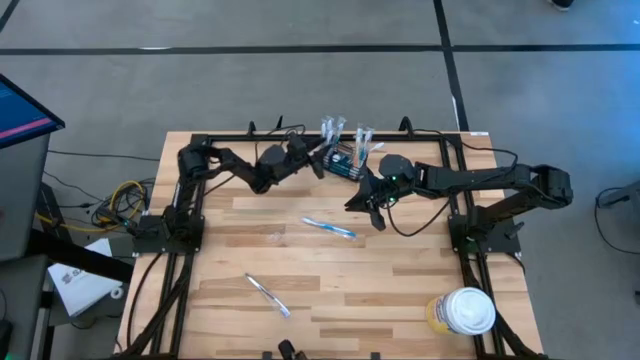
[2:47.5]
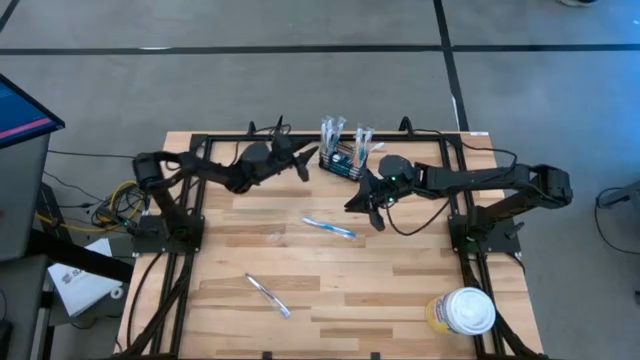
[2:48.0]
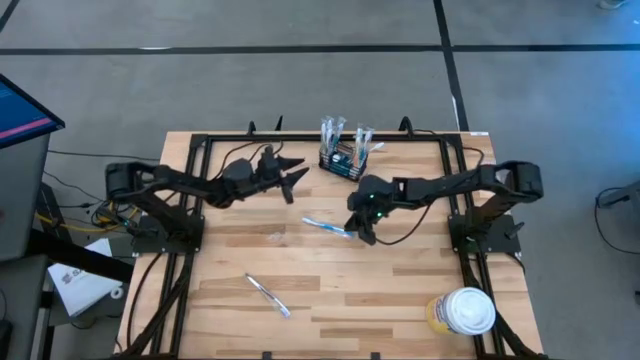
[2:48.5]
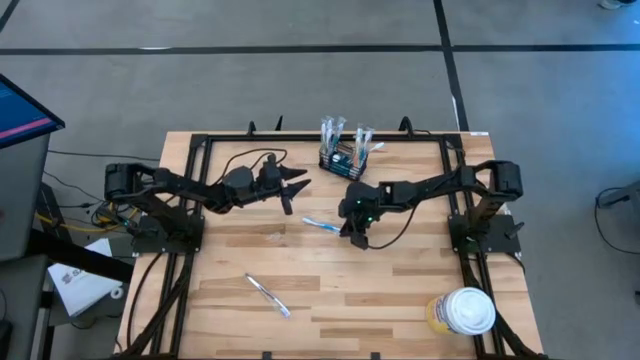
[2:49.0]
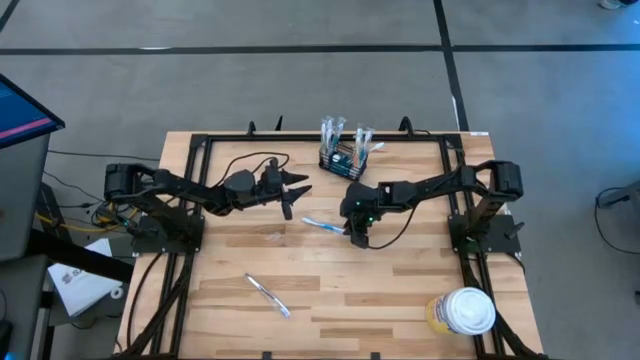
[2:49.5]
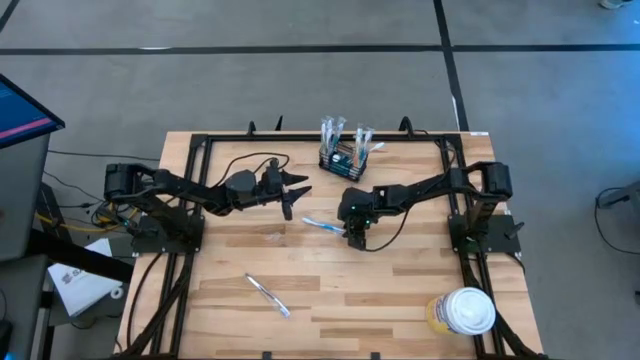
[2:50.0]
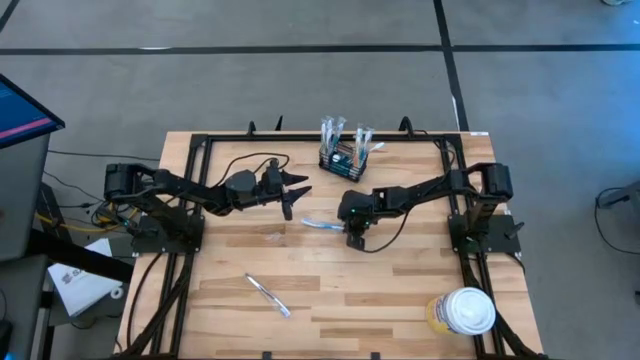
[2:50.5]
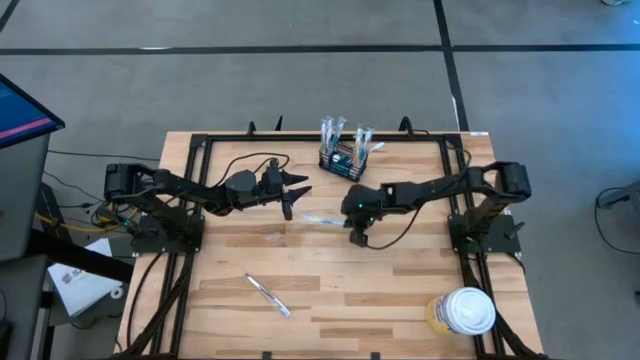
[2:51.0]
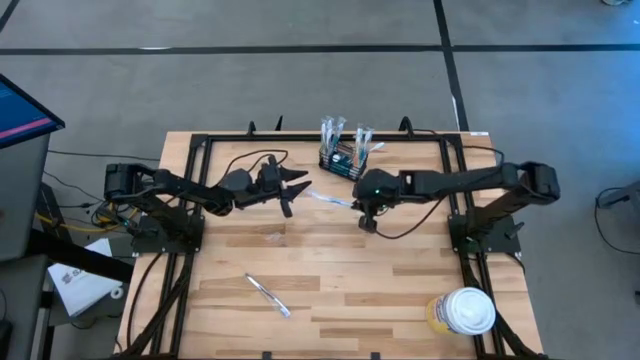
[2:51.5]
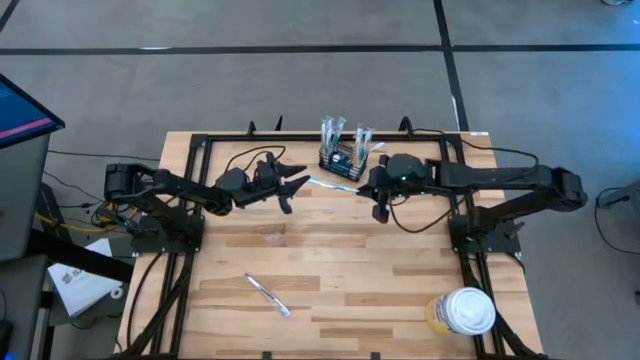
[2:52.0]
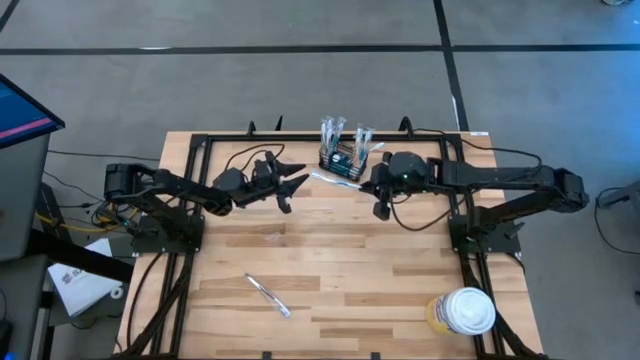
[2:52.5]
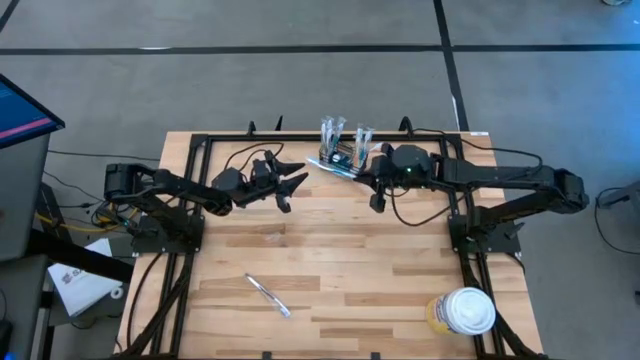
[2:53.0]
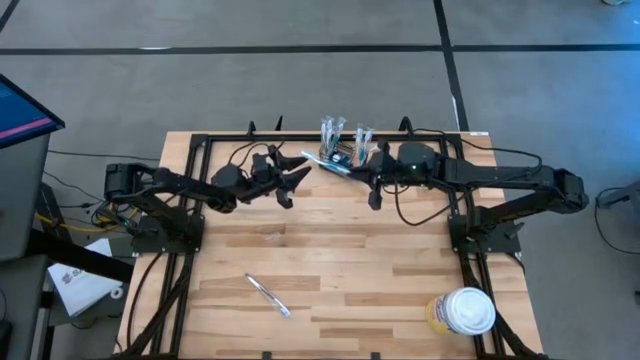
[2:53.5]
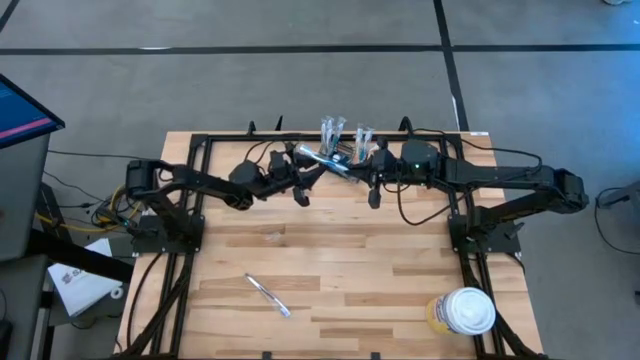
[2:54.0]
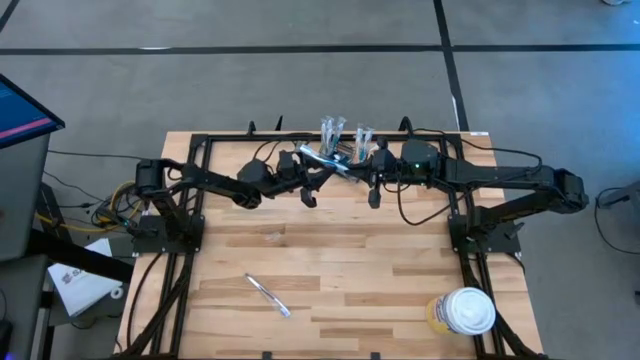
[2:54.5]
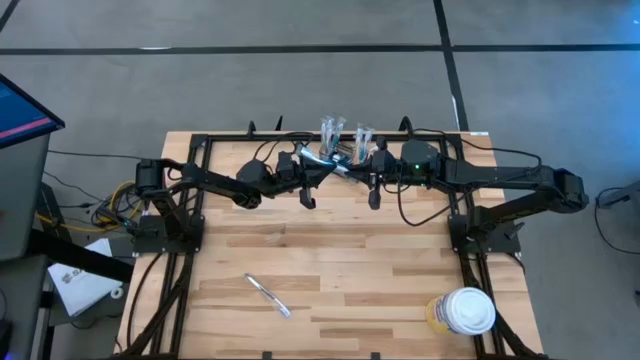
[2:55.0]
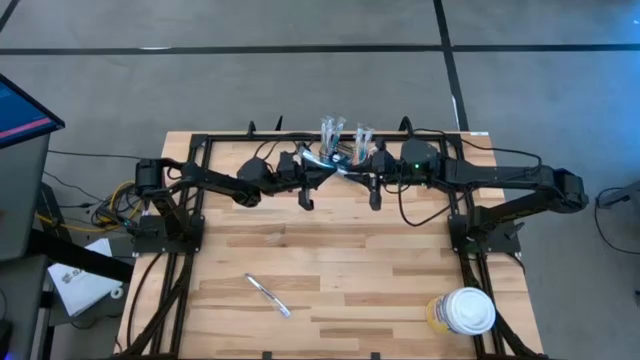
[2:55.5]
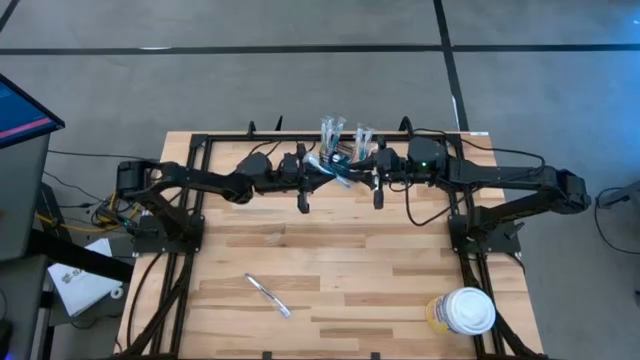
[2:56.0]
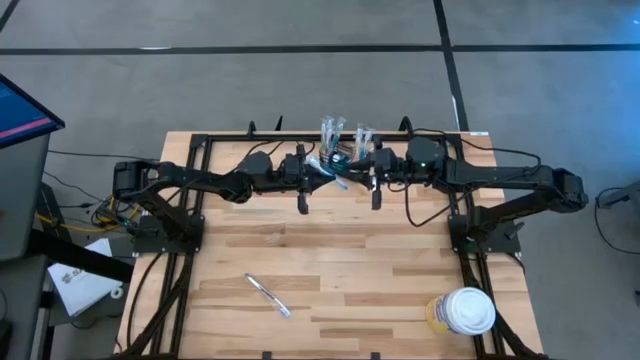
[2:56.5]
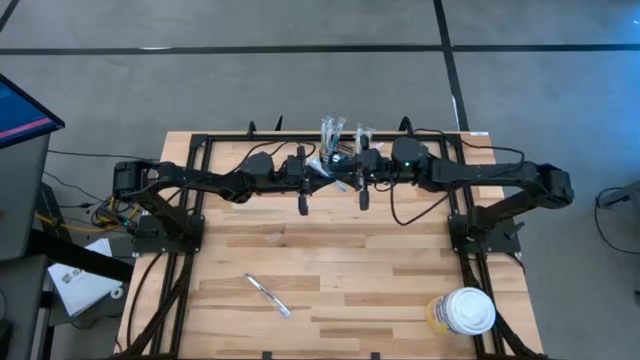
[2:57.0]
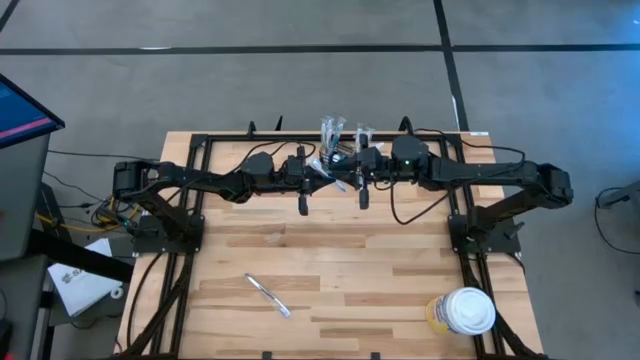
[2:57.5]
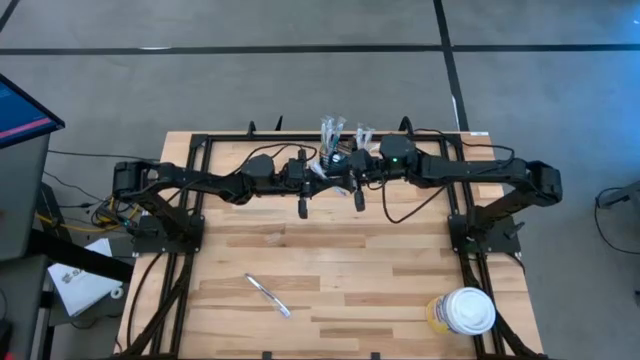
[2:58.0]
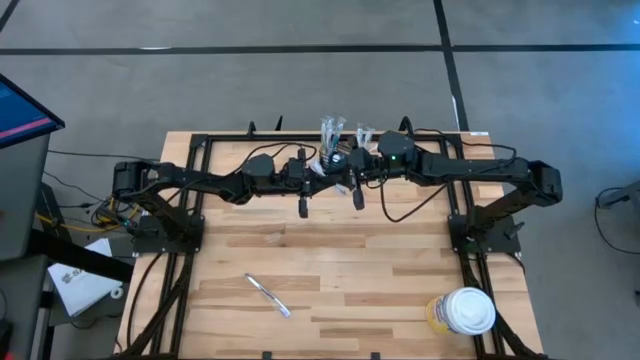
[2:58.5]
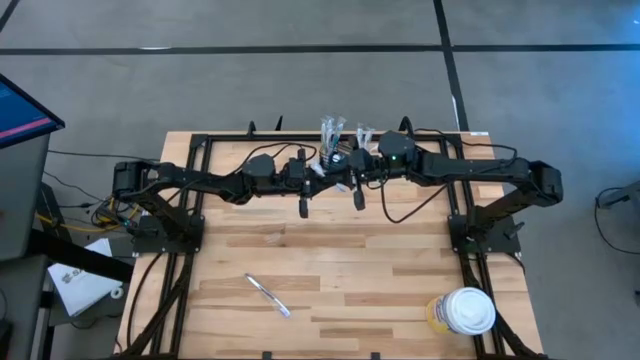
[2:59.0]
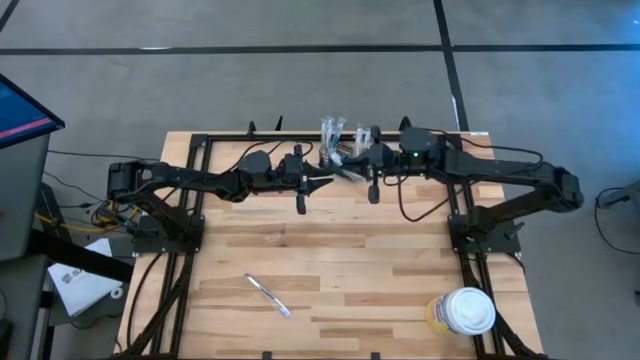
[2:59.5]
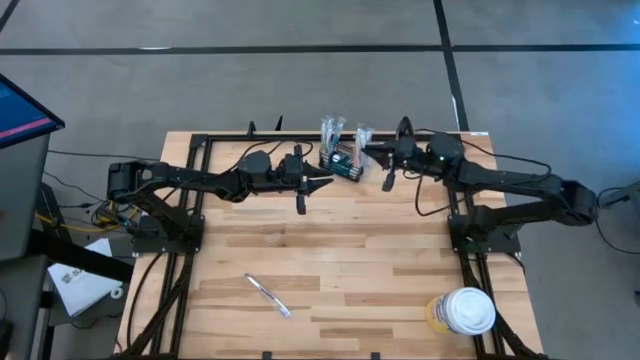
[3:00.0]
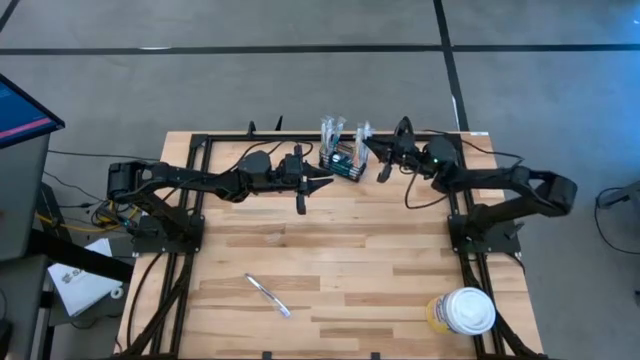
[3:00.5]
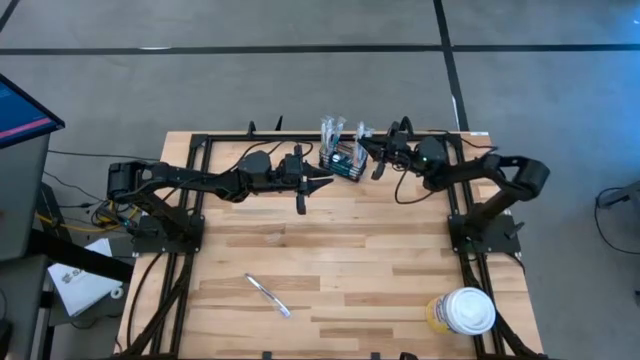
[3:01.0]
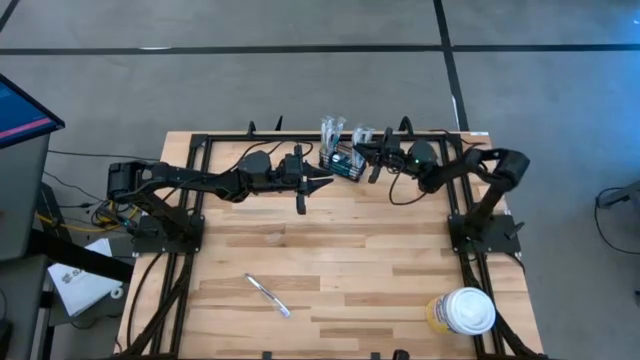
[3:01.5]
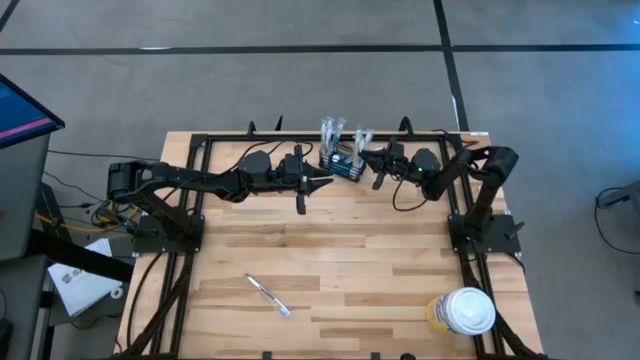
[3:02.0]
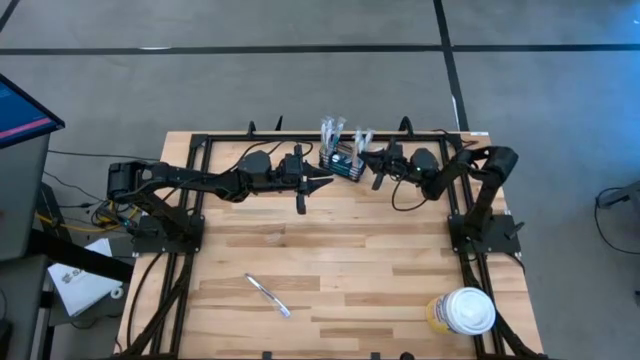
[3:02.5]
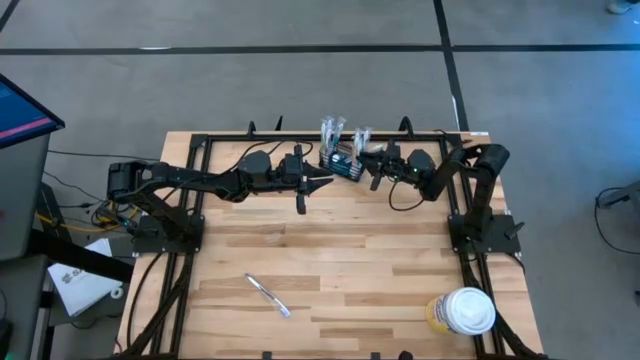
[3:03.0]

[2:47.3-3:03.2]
Task: Pick & Place toothbrushing station
Put the blue toothbrush into the mesh organizer
